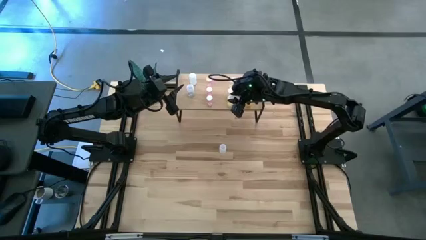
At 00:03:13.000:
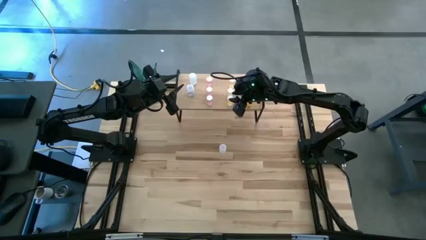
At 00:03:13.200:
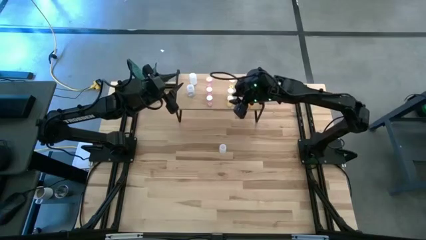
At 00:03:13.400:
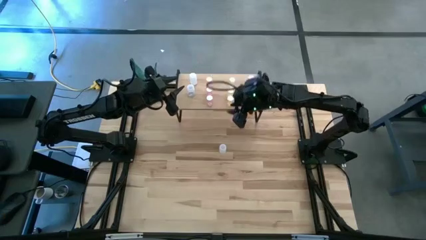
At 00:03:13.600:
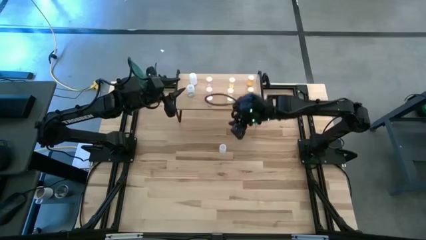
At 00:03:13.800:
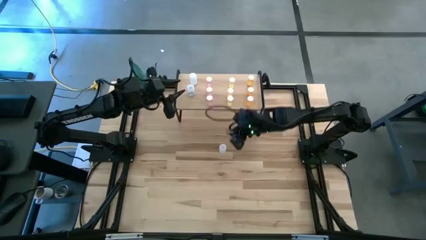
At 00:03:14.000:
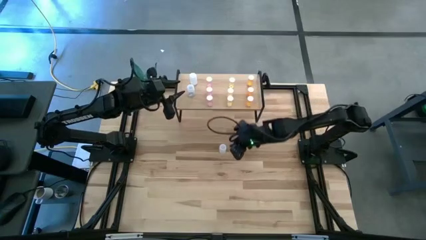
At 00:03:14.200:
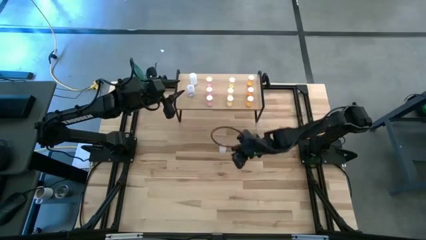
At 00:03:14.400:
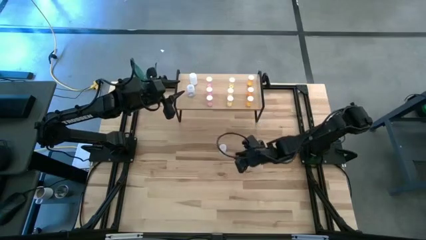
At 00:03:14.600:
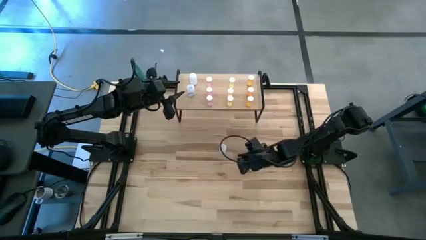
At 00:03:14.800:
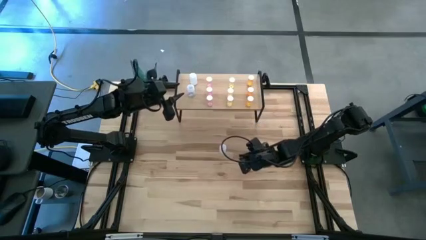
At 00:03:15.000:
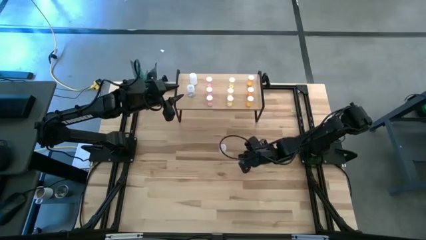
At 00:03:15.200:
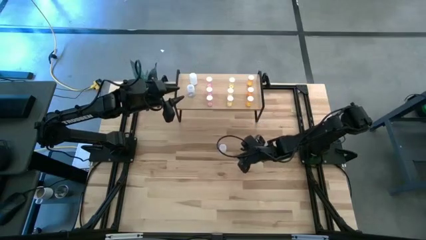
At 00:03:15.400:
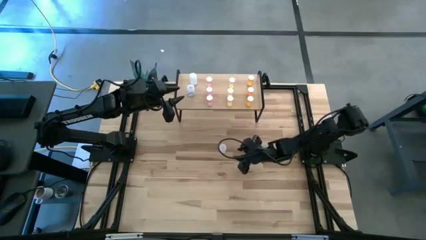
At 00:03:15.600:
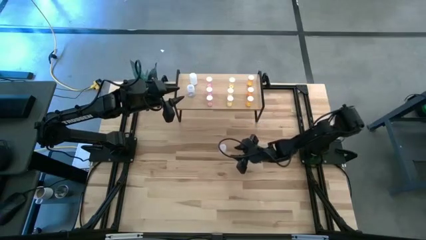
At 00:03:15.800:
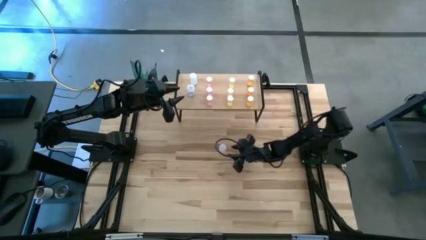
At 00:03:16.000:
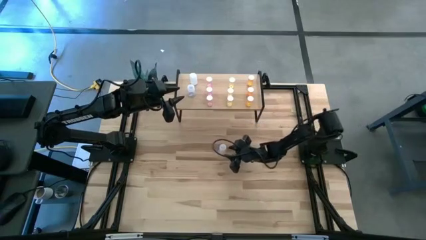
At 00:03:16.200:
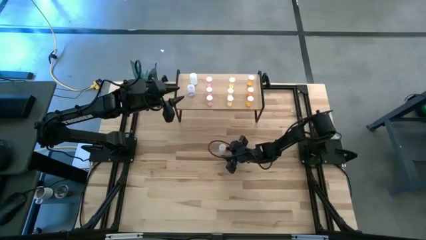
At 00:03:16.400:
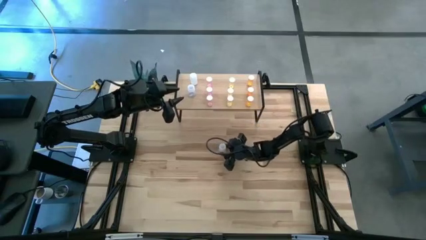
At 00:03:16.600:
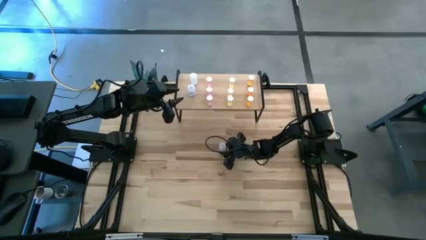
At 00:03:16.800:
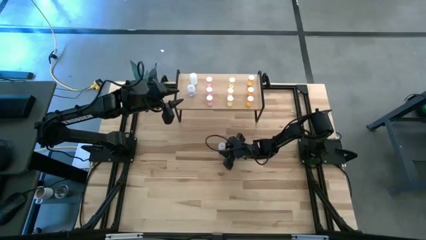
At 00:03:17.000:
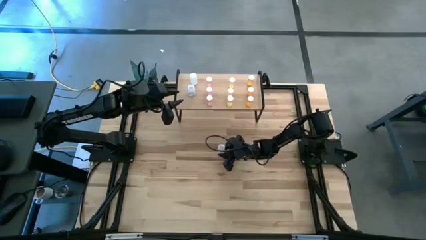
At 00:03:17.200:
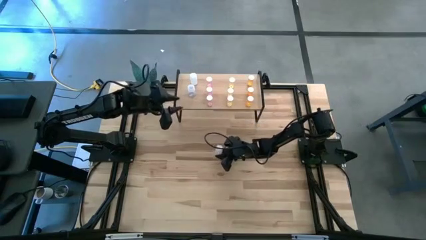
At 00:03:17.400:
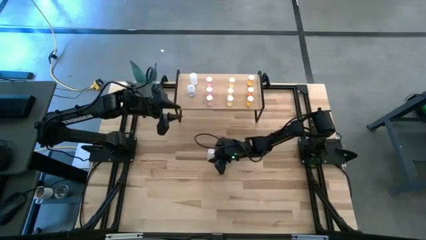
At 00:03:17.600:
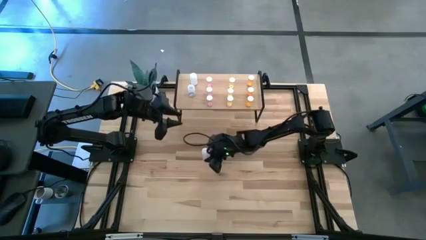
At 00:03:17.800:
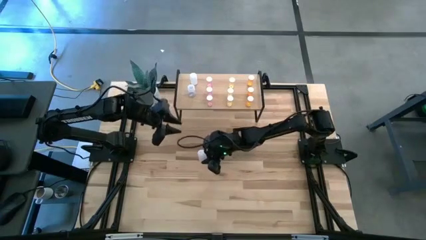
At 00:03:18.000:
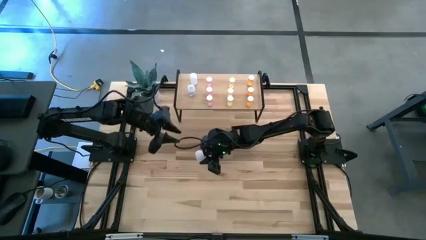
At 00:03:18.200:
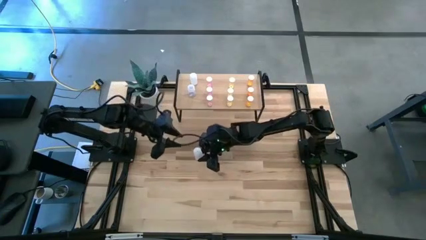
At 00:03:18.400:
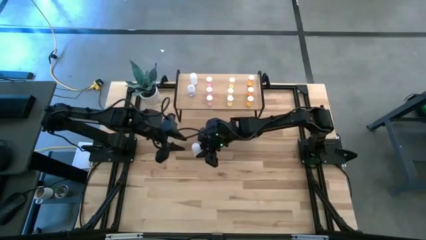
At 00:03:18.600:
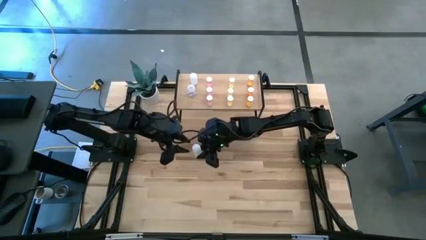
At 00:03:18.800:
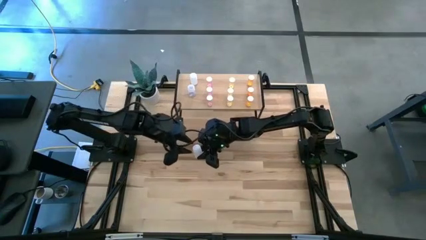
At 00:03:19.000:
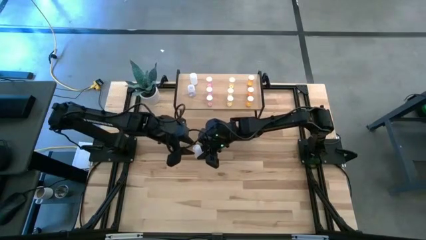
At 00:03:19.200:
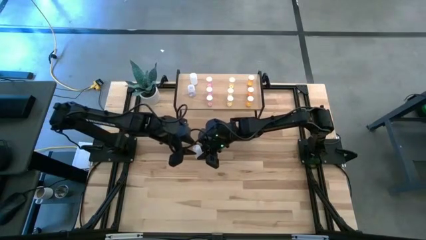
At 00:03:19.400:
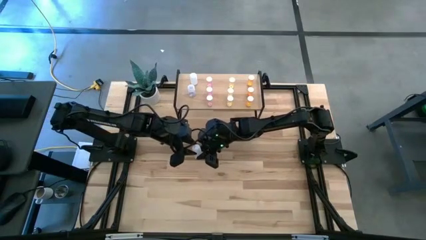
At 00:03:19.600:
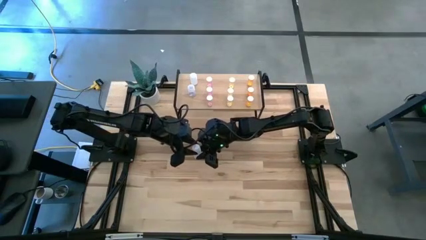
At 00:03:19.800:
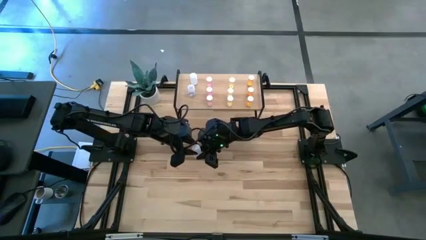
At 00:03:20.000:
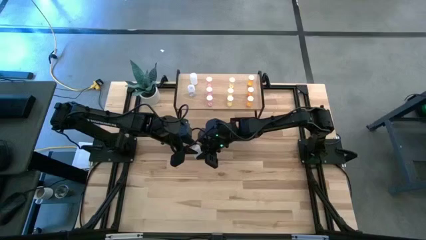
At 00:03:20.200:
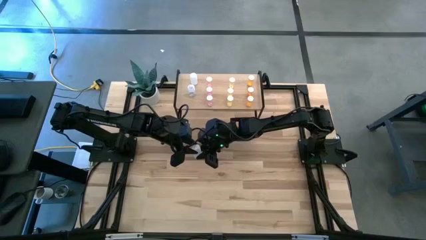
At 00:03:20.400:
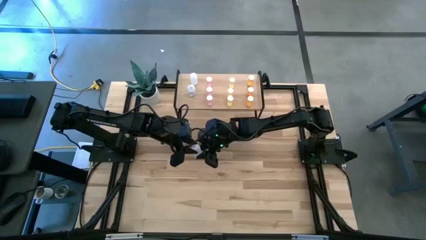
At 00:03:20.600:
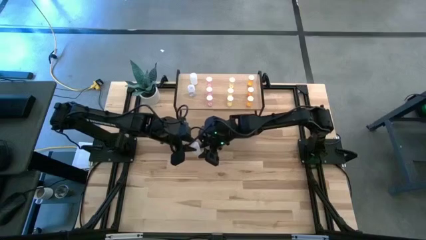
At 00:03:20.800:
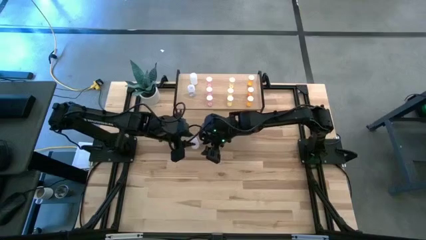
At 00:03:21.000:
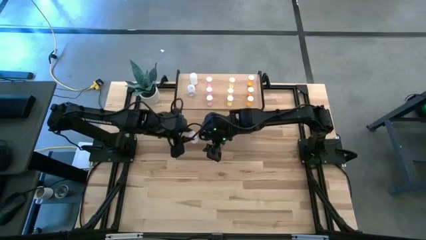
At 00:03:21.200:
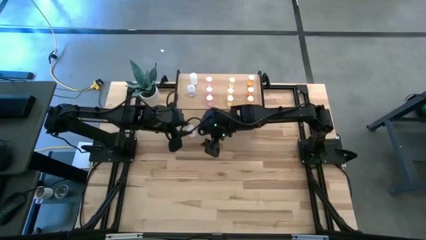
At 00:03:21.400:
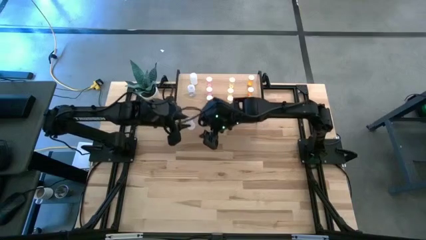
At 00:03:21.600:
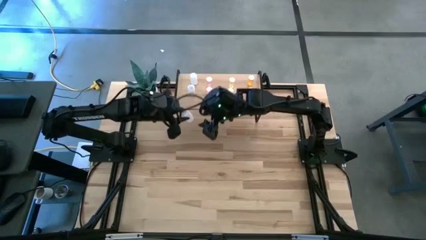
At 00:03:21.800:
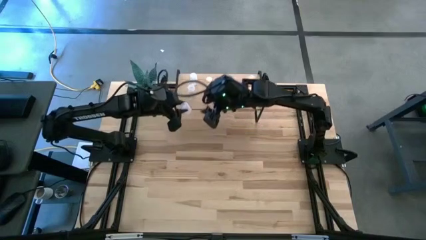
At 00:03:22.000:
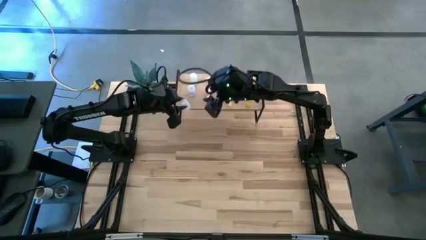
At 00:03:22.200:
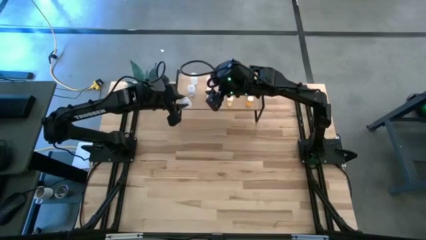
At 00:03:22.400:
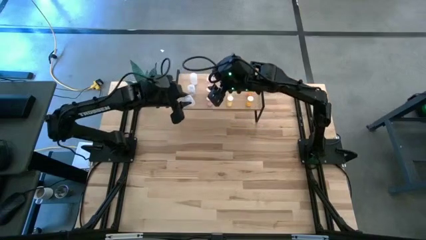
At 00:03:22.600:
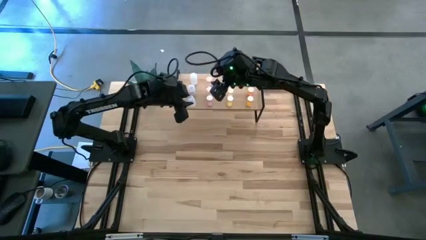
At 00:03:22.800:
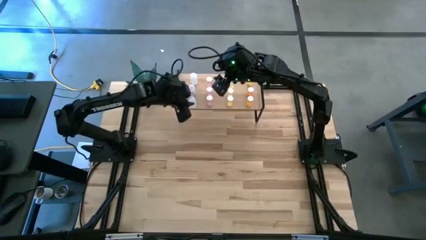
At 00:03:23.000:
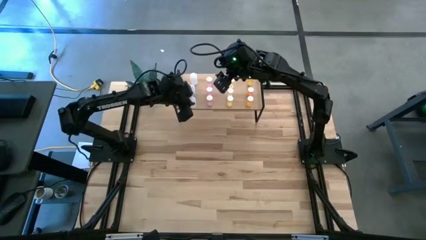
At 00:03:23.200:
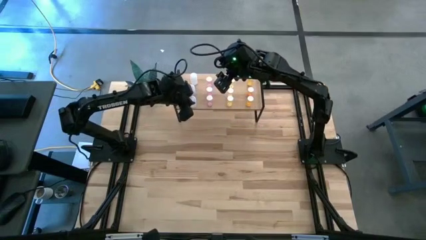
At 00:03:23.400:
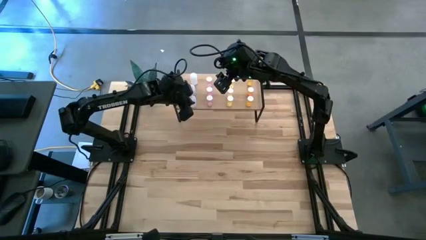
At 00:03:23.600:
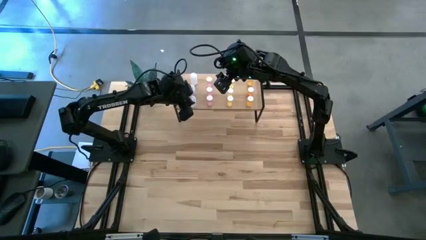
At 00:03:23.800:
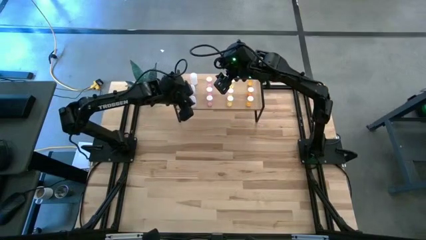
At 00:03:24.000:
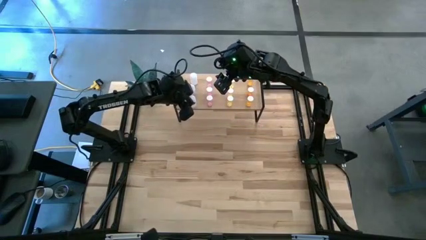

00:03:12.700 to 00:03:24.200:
Task: Pick and place medicine bottles onto shelf by color
Put the white pill bottle aligned with the other white pill bottles on the shelf
